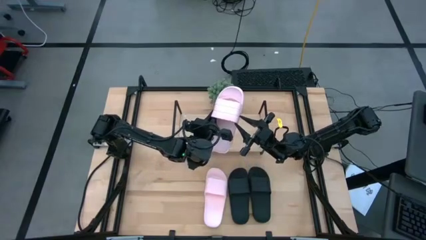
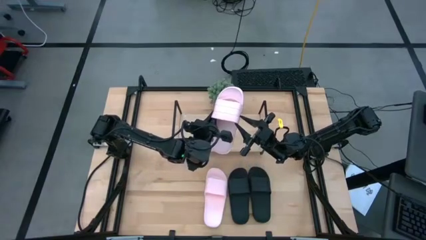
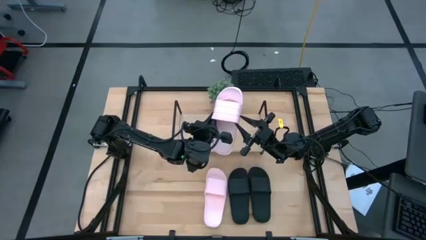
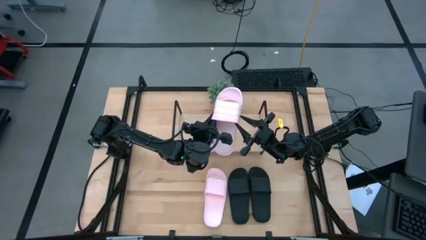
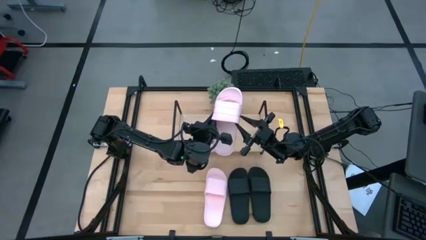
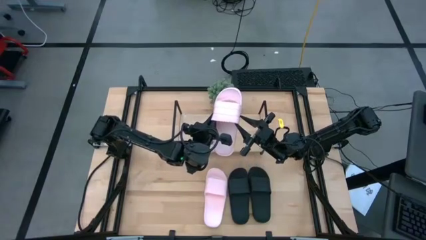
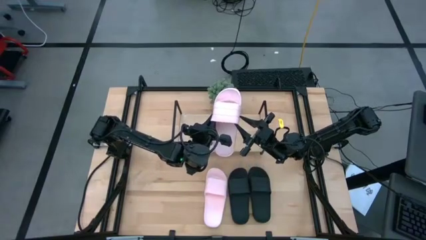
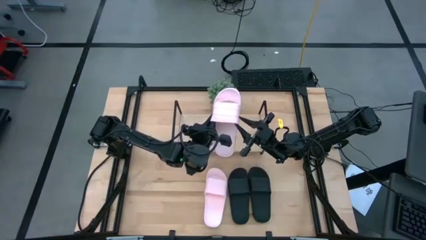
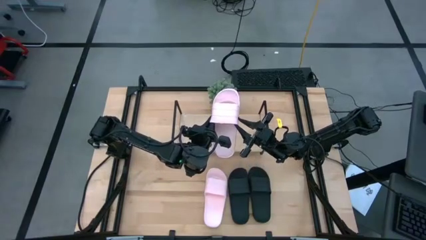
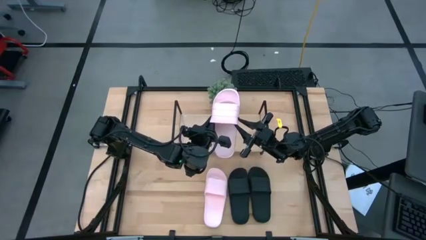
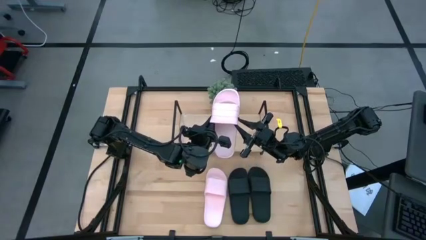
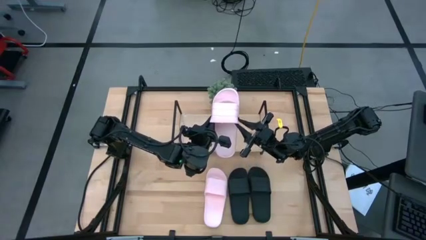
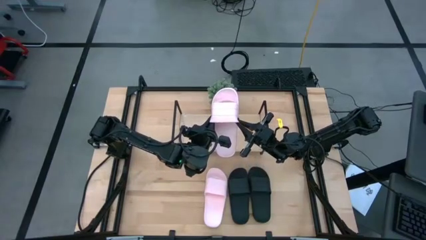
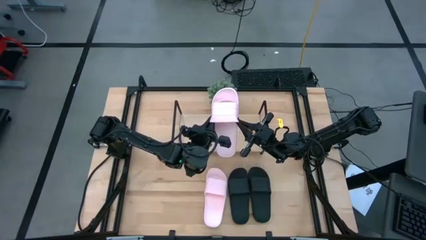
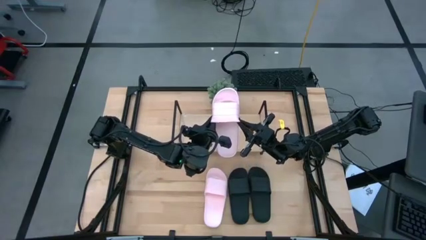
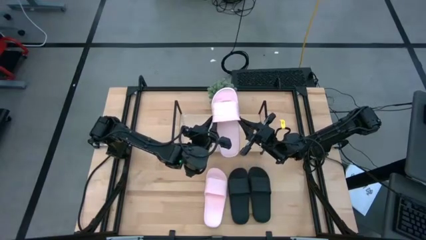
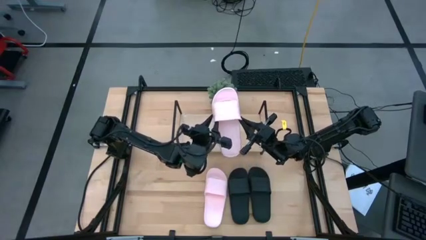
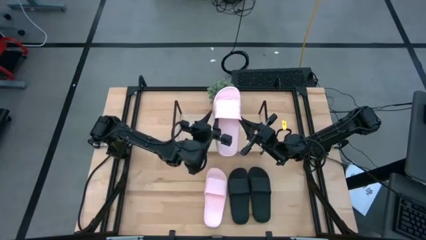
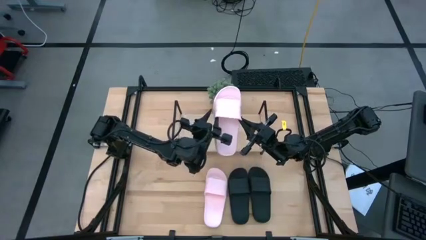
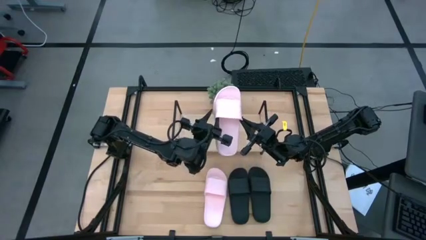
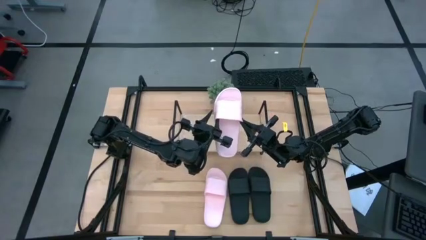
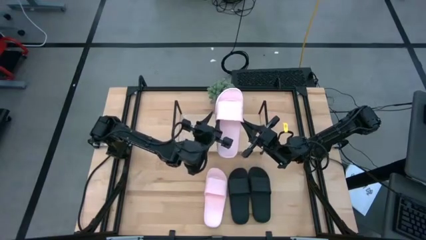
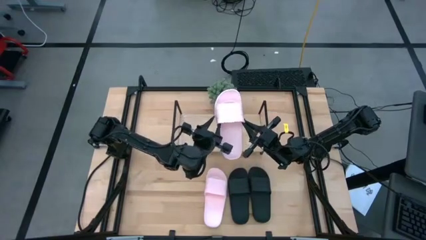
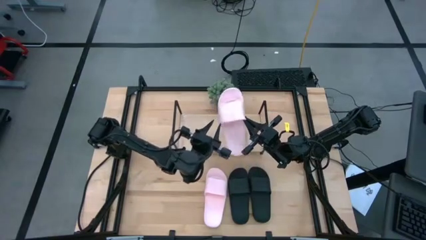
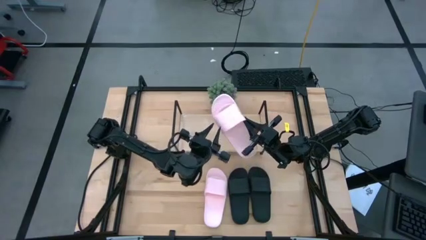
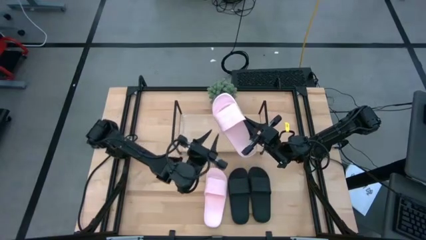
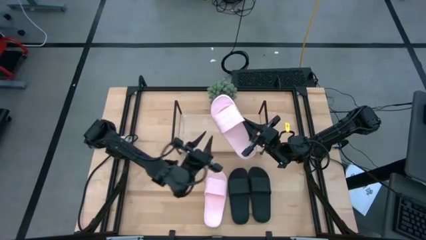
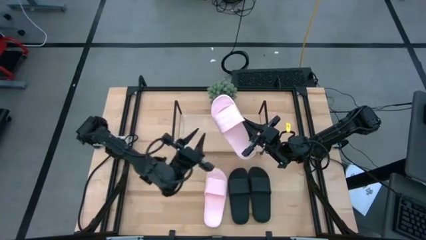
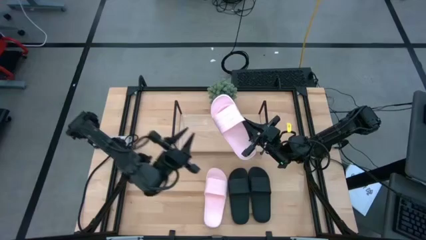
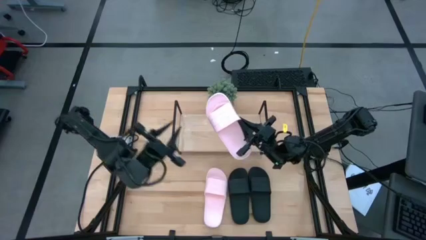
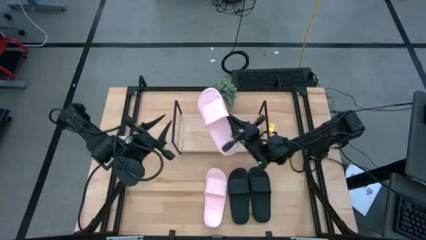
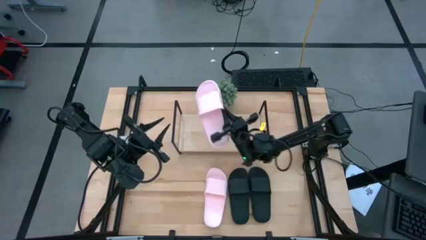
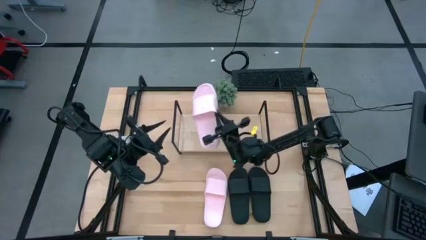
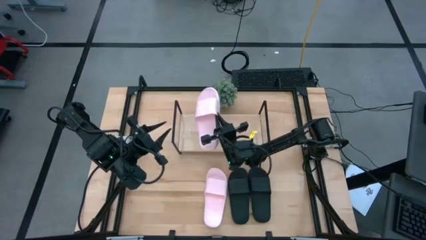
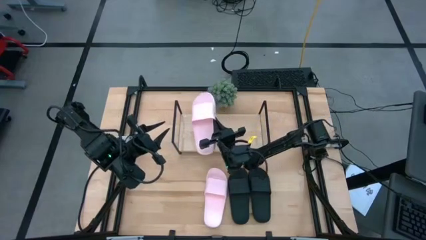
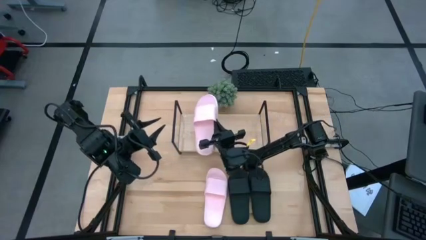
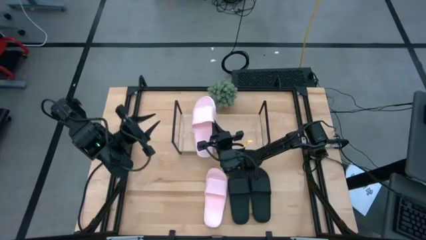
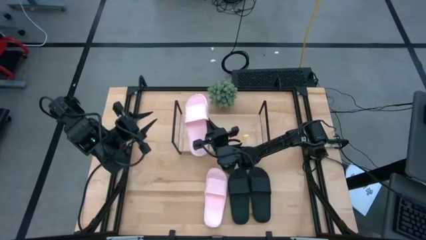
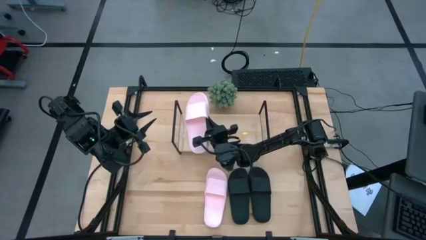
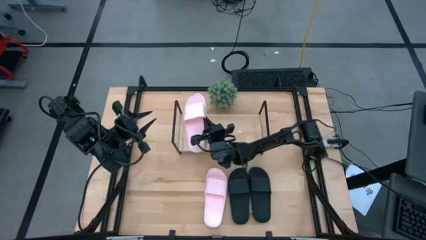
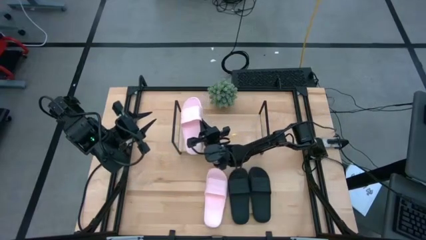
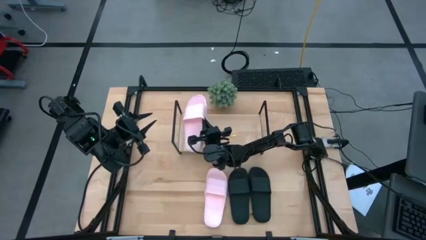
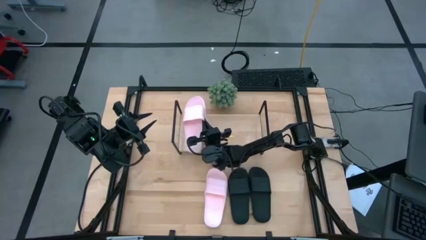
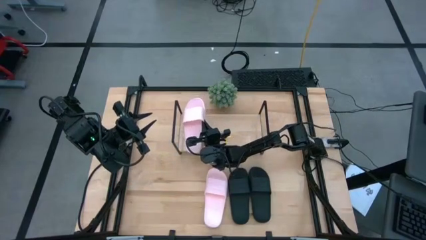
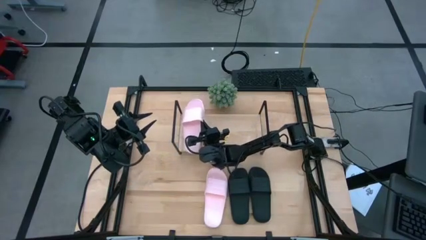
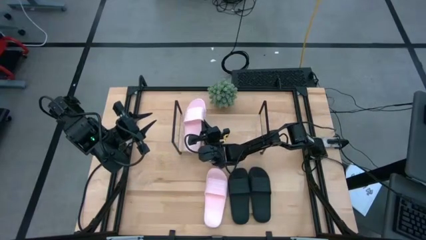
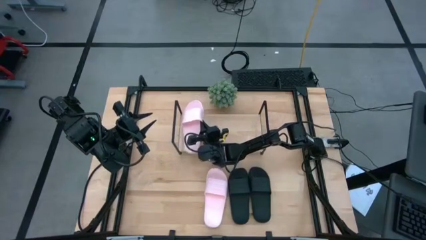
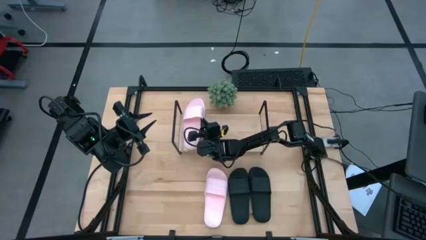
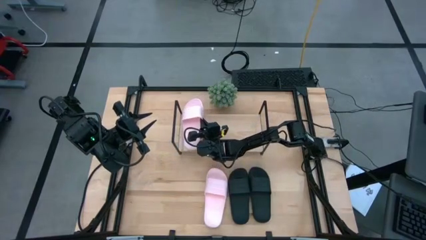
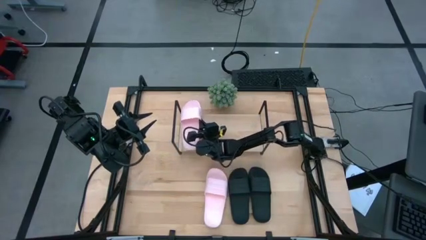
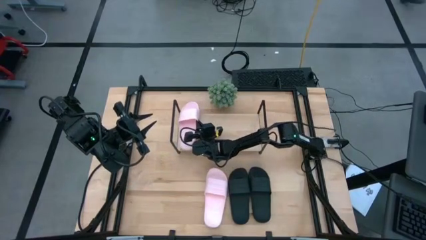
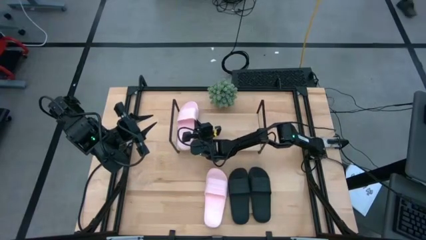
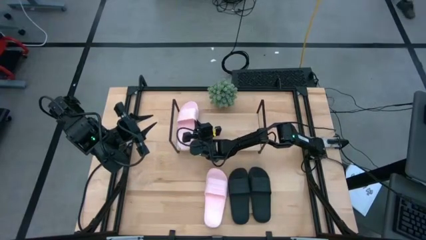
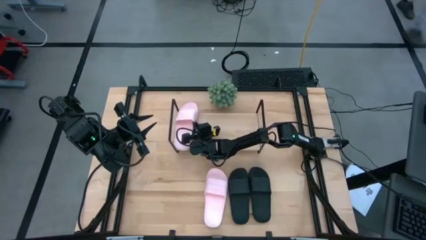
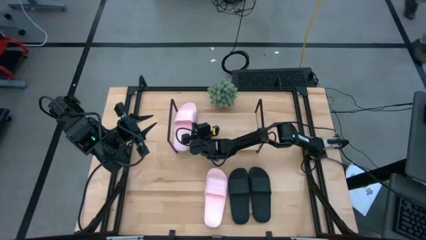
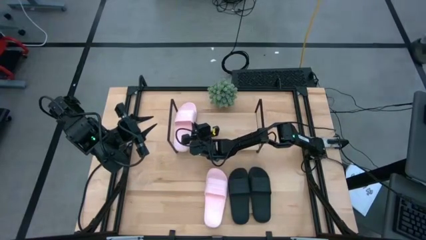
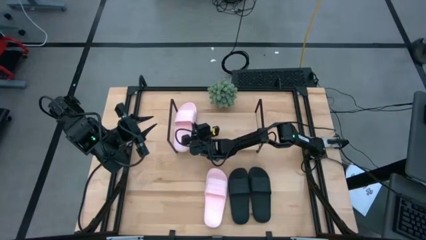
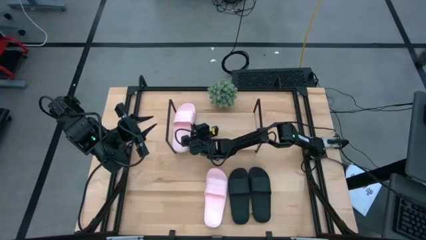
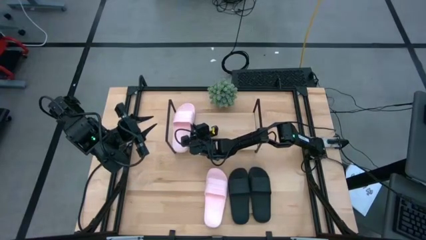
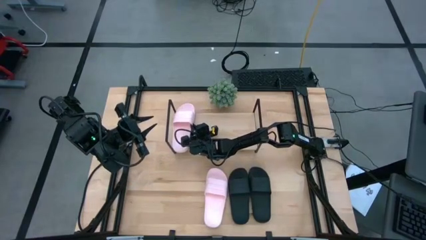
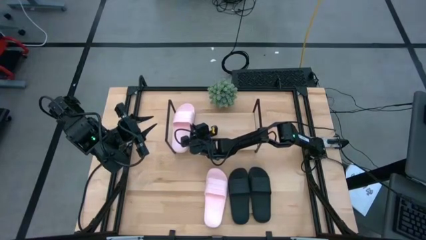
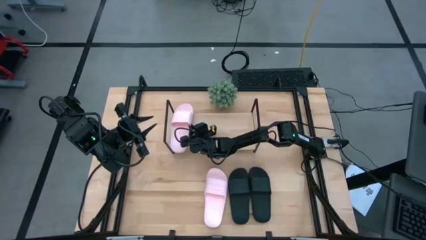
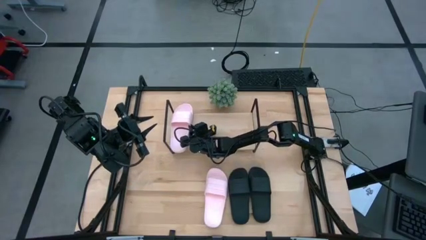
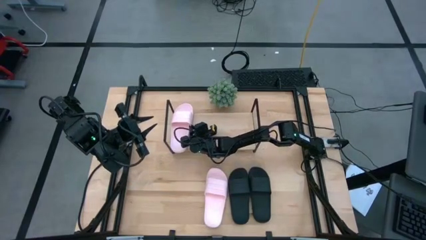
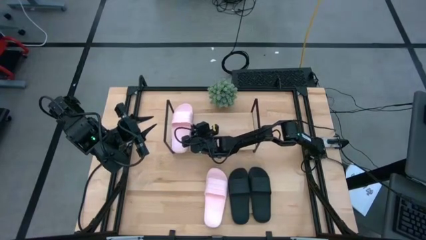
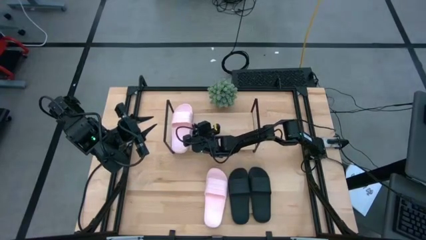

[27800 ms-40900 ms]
Task: Pick and place slides into the shelf
Put the pink slide on the shelf
